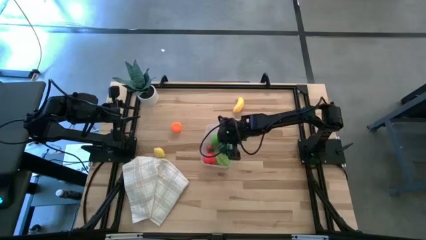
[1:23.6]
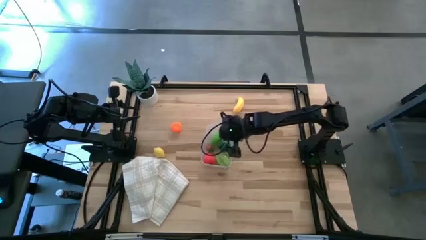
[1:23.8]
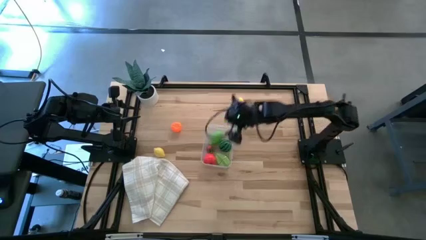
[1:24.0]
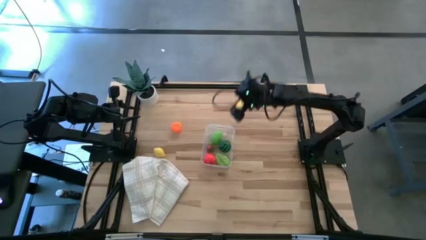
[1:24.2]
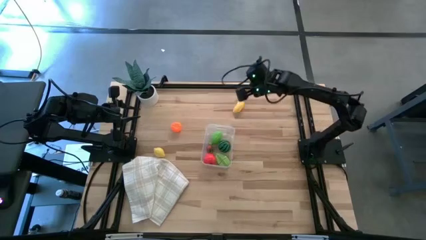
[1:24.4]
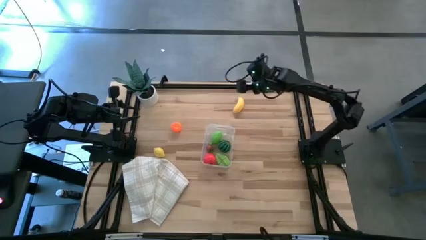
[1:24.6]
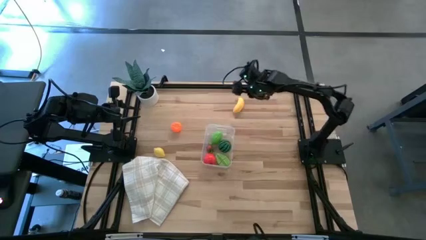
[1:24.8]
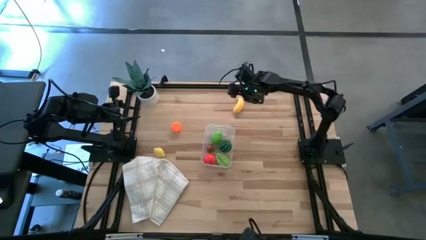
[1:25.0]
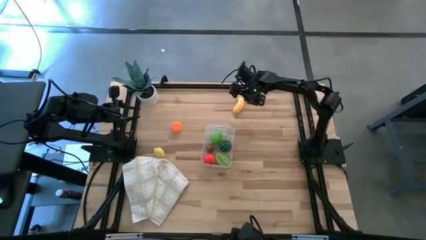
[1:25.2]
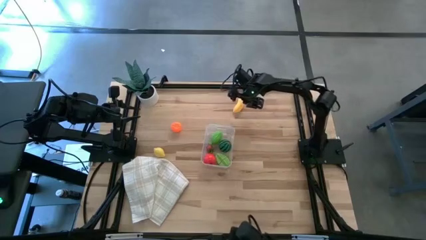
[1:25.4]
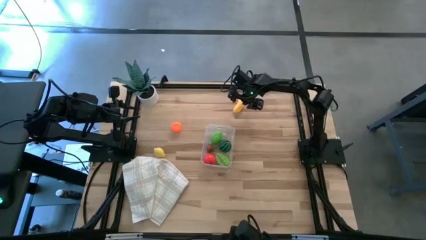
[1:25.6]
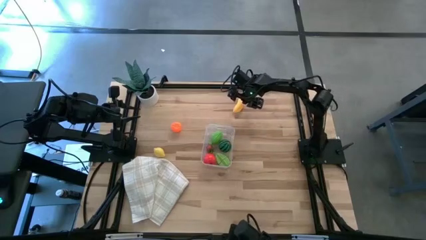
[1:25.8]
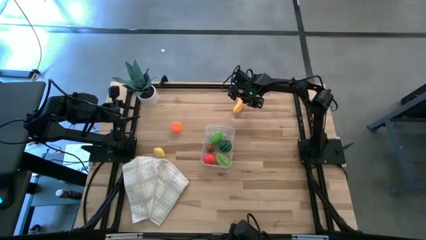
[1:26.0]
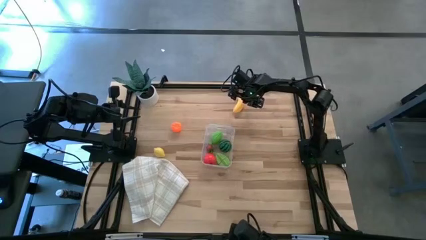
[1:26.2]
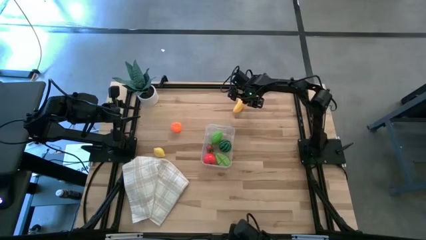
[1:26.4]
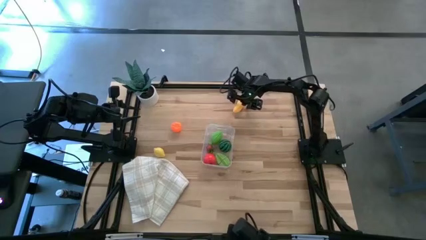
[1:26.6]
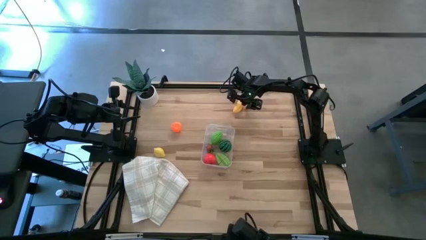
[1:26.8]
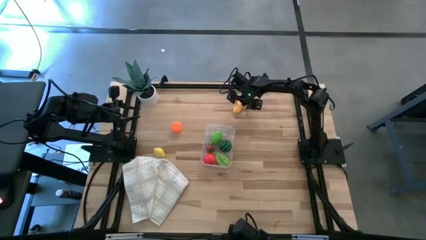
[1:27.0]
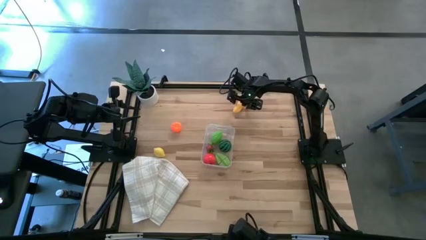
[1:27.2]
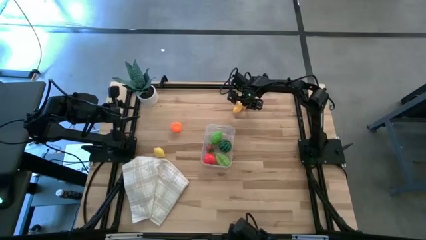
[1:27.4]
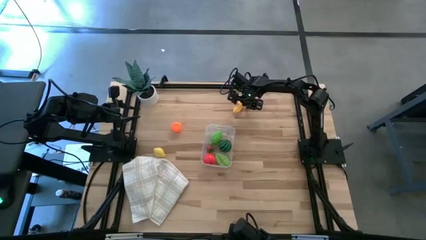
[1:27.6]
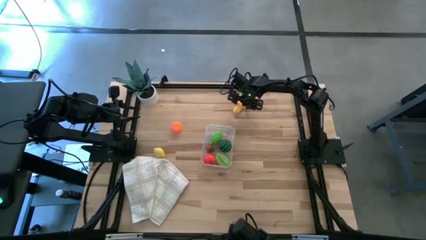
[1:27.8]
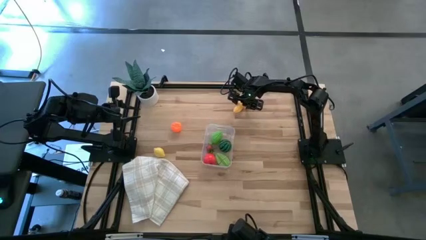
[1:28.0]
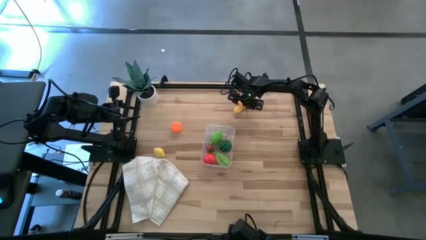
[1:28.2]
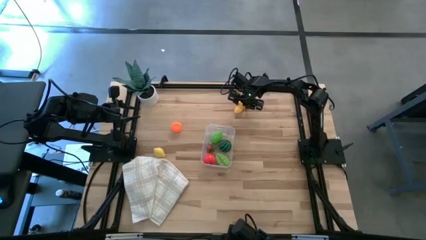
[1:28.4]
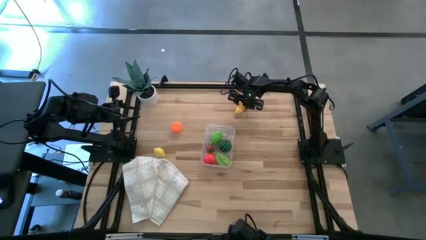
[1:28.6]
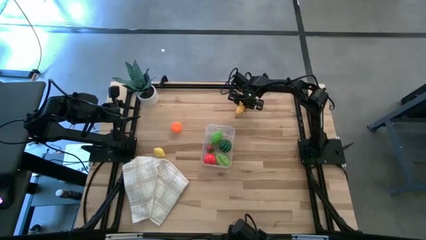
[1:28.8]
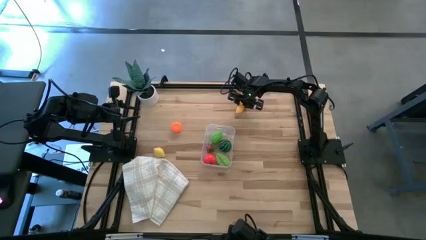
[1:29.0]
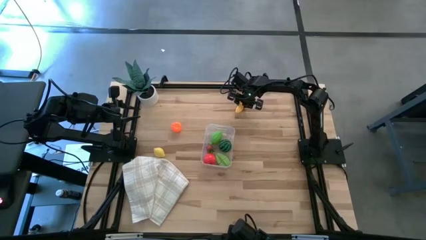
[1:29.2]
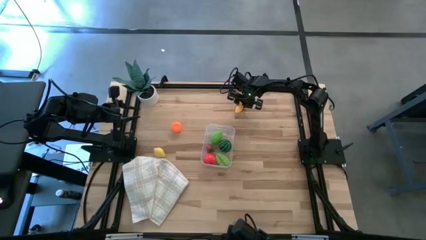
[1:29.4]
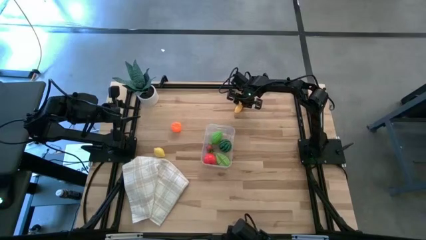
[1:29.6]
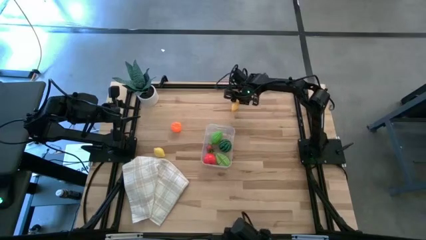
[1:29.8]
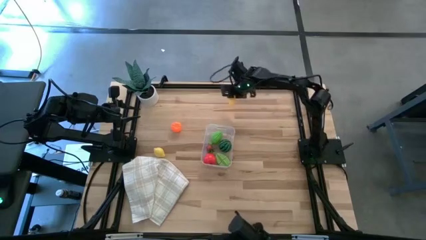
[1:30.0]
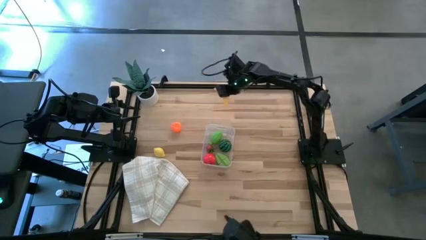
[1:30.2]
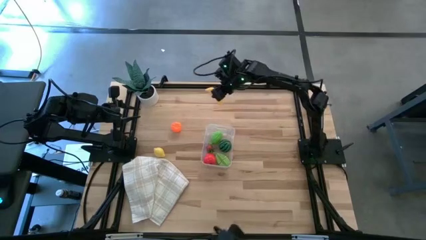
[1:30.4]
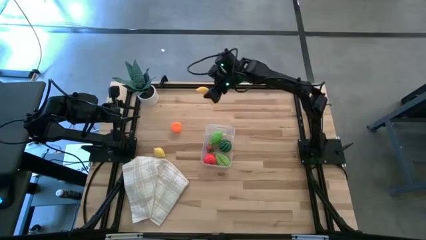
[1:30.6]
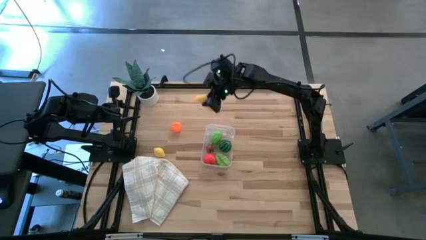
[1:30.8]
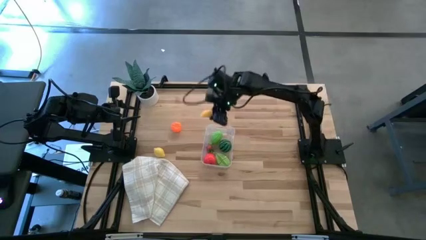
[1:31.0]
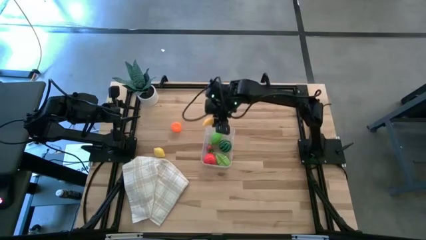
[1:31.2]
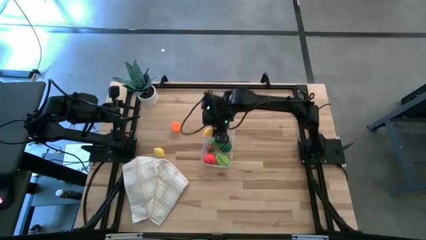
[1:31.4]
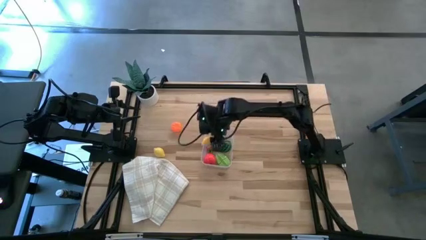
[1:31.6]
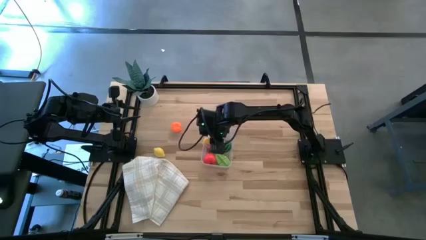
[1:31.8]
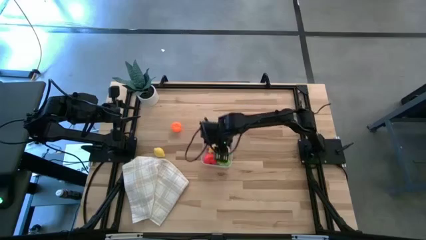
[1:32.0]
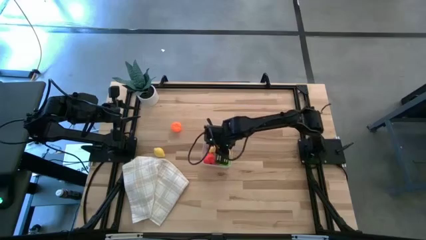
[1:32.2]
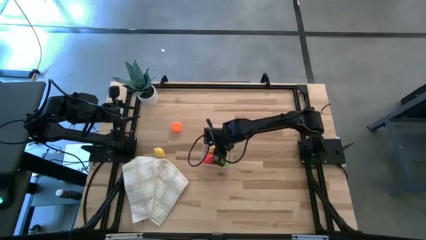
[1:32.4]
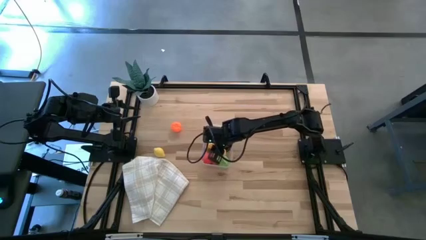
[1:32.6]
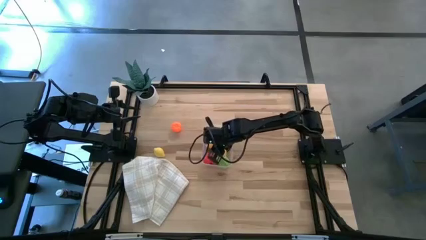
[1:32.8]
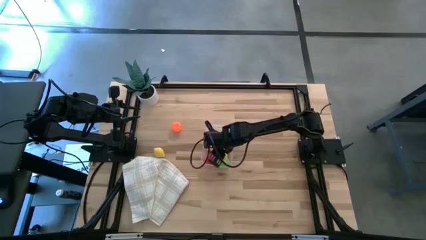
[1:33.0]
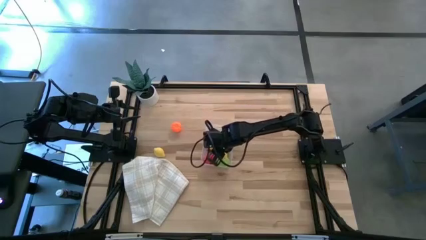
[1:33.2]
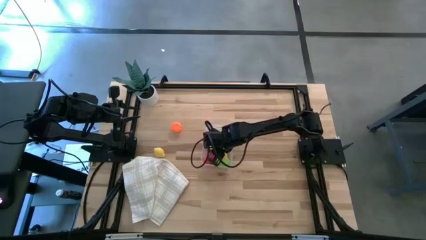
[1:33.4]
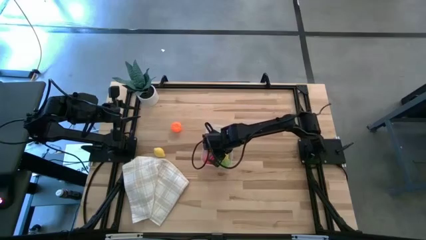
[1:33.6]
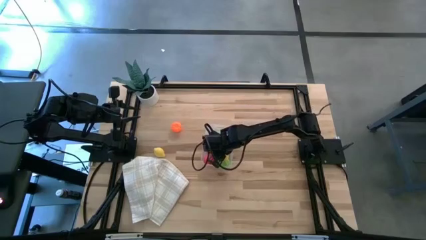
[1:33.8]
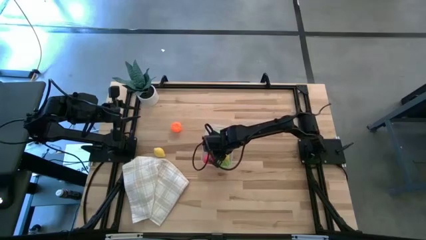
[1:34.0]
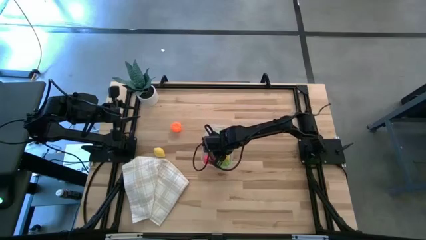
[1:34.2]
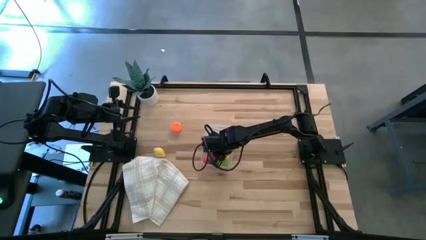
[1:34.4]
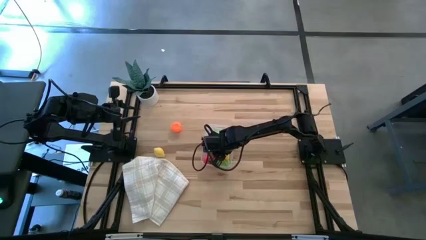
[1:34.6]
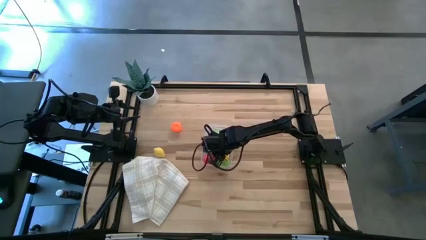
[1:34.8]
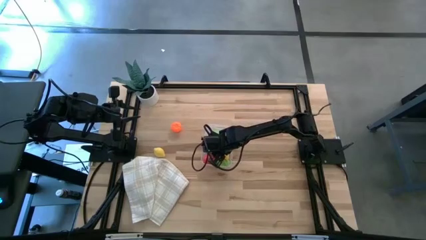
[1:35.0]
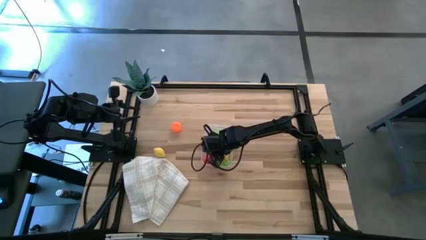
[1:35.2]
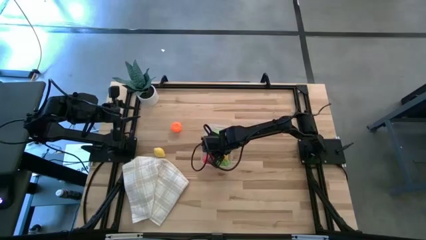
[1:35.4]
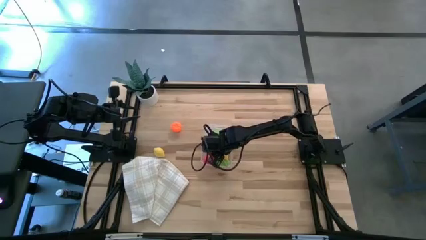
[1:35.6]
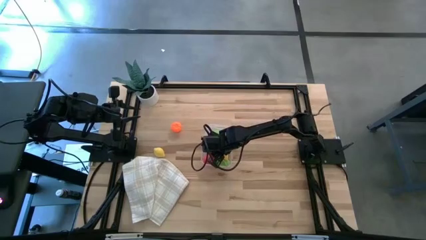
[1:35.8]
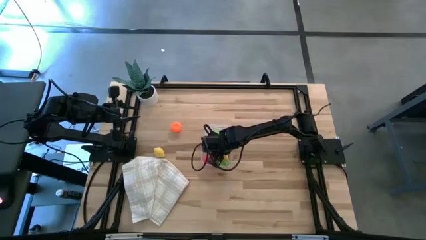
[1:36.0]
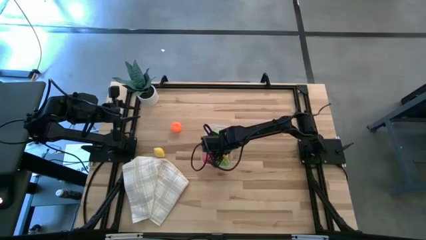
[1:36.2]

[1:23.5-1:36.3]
Task: Pick and placing Produce into tupperware
Put the banana into the transparent bin

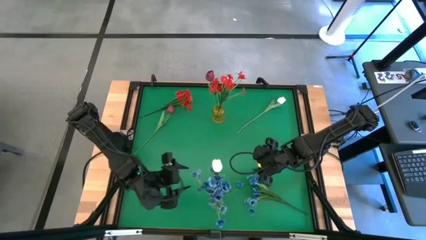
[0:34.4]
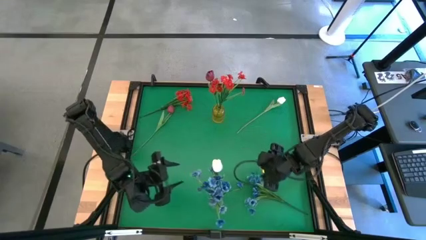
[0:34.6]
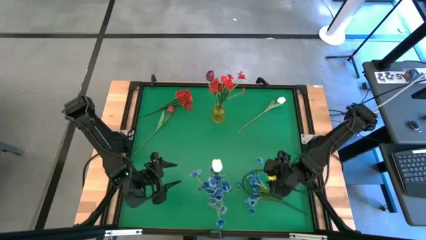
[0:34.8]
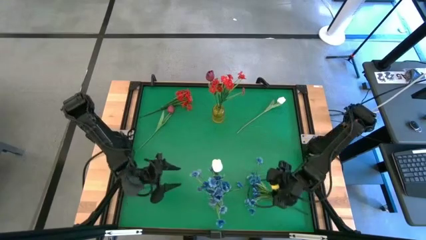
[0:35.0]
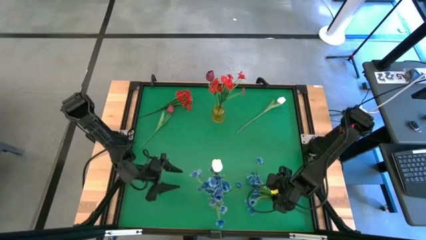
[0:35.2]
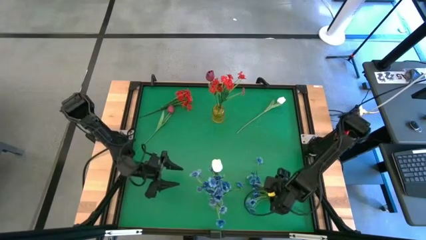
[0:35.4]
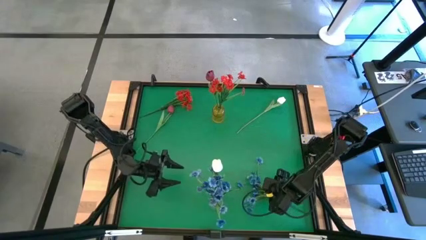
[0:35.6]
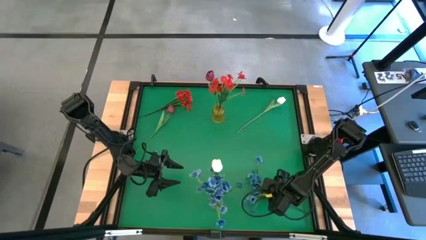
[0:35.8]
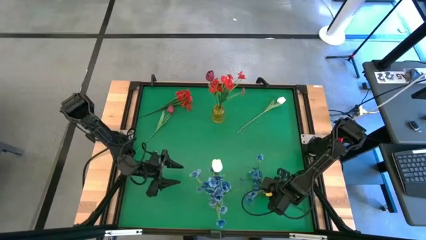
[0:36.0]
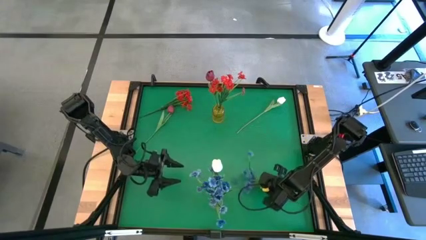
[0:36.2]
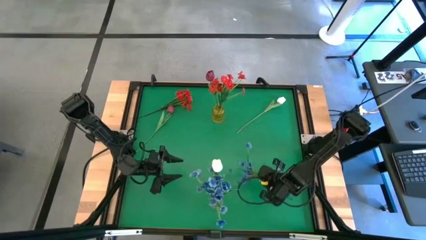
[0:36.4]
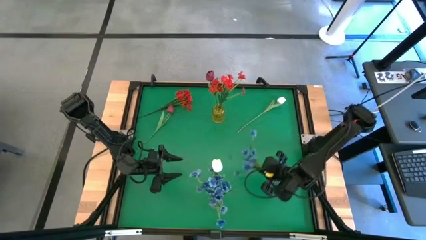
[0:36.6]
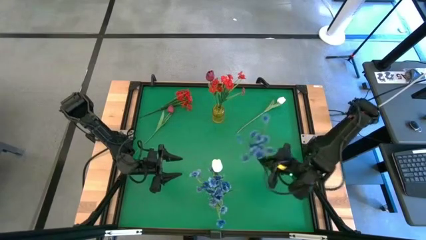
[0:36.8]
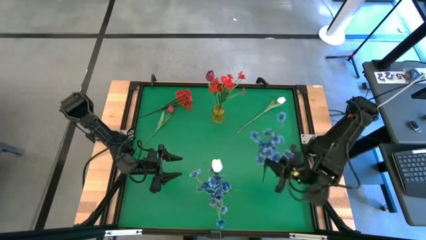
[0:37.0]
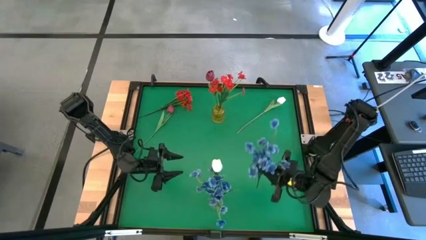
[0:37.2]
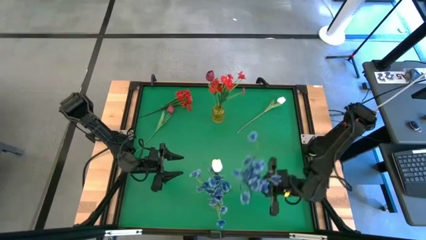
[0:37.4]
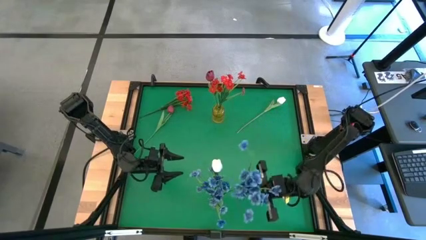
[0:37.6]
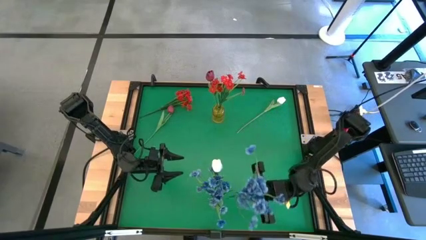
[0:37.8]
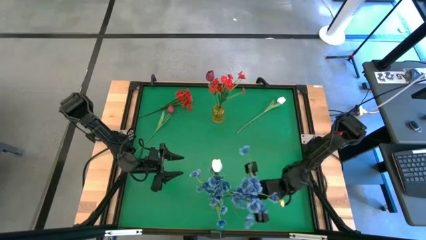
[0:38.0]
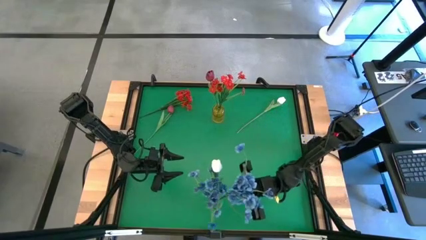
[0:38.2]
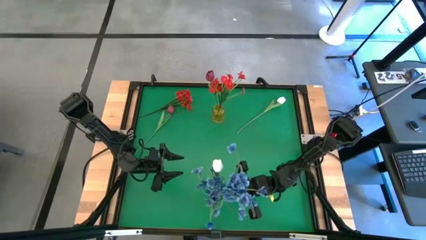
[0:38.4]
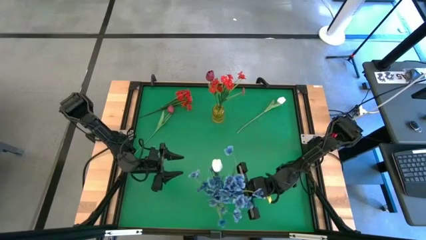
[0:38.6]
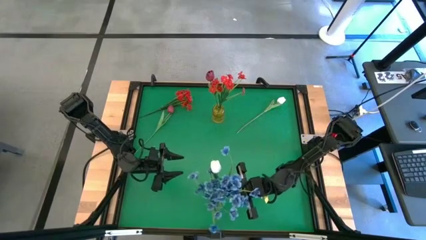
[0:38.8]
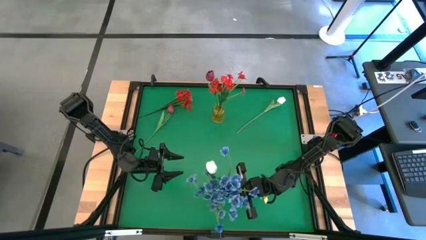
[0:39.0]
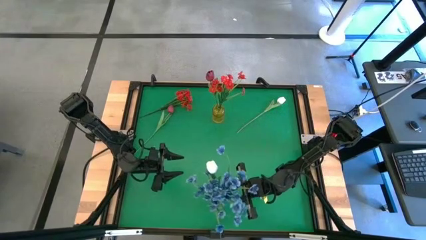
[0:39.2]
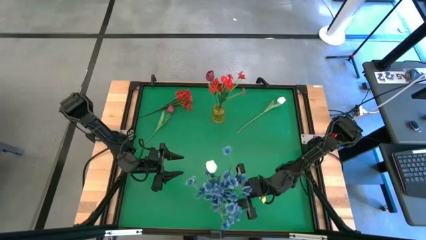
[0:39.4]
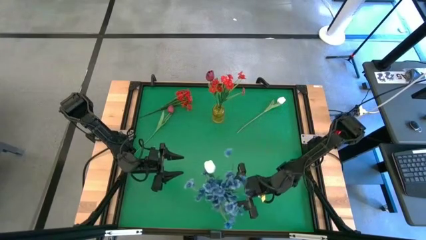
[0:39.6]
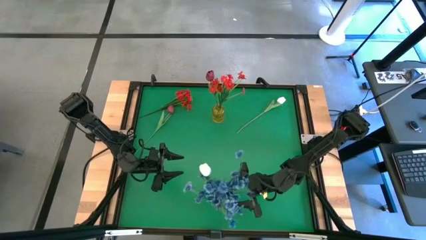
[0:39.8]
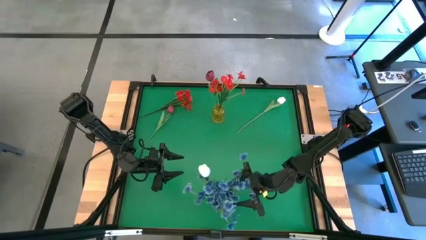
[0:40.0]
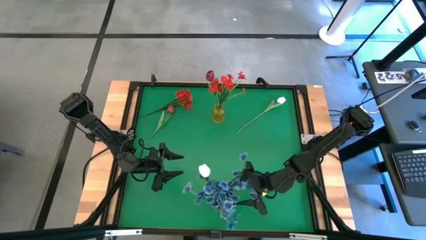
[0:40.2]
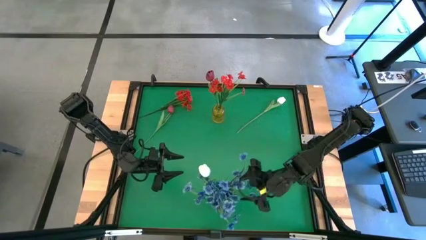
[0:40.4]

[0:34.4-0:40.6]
Task: Sort flowers into vase by color
Put the blue flowers into the transparent vase
